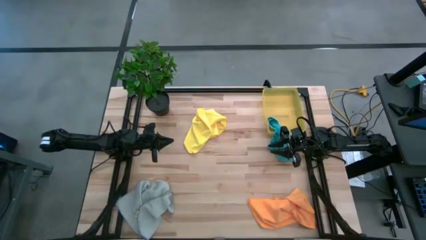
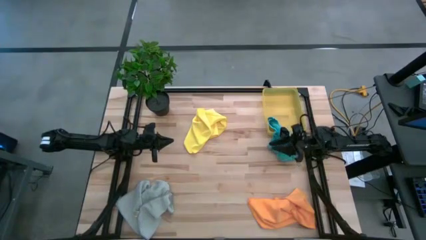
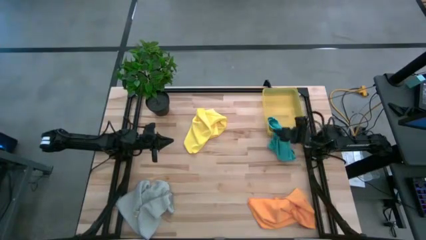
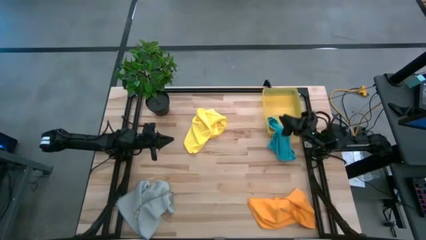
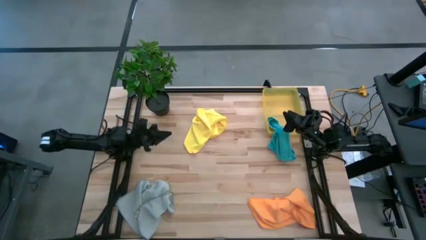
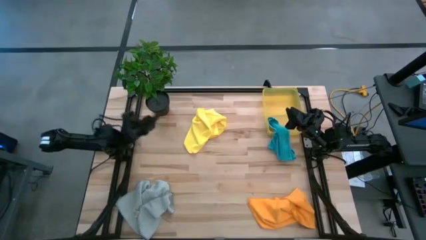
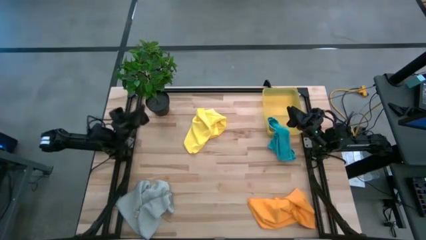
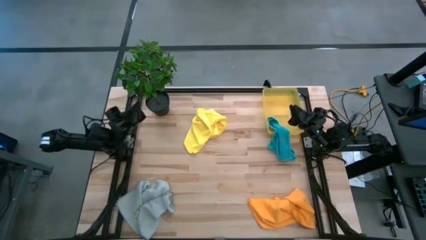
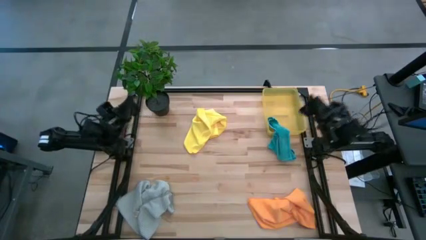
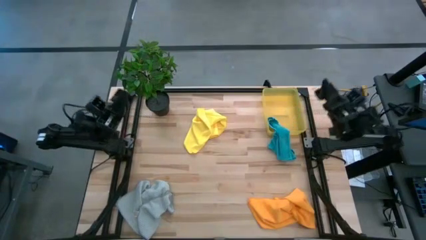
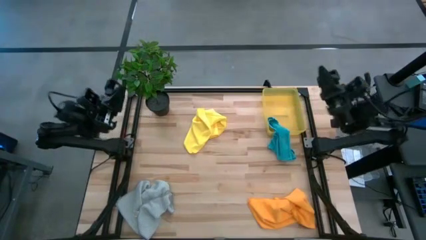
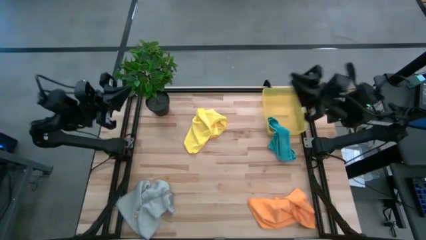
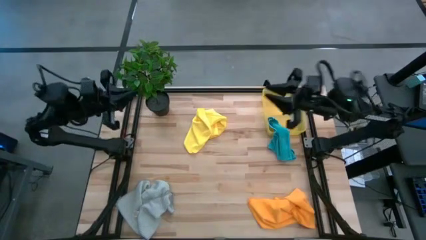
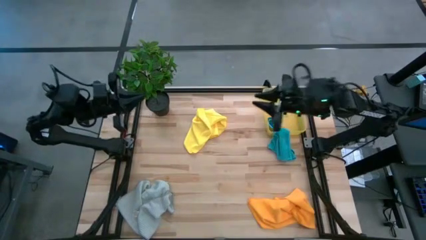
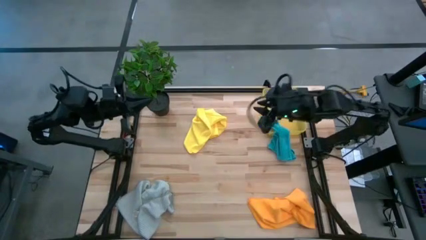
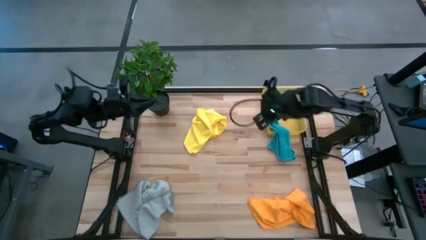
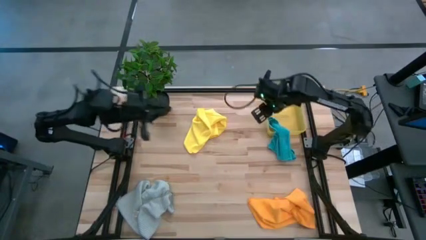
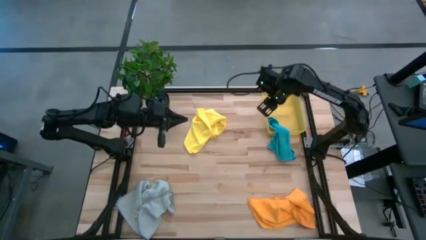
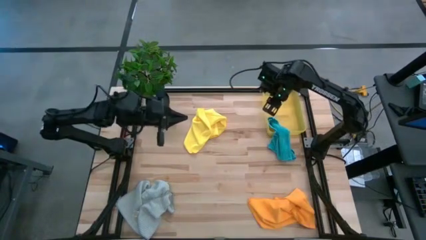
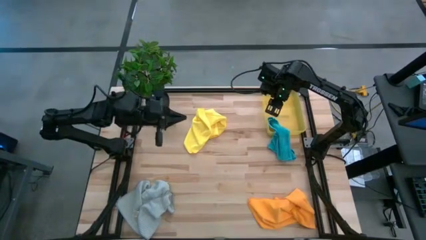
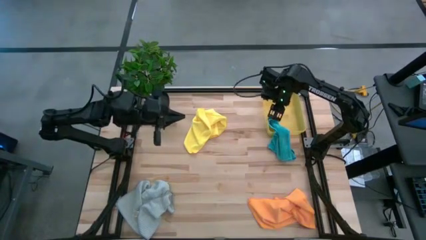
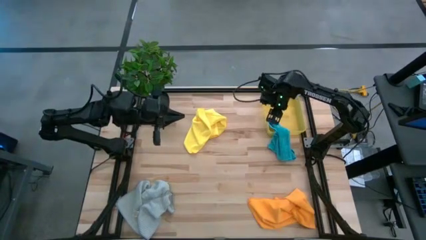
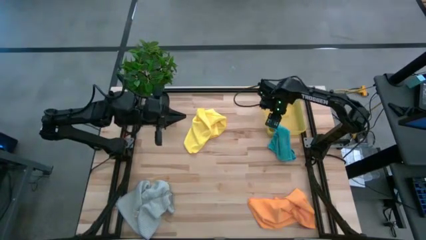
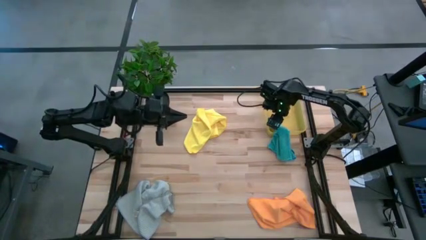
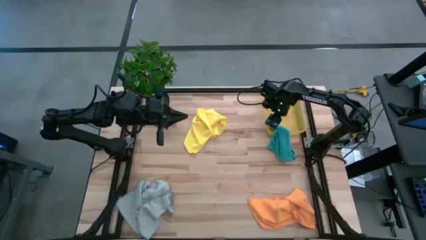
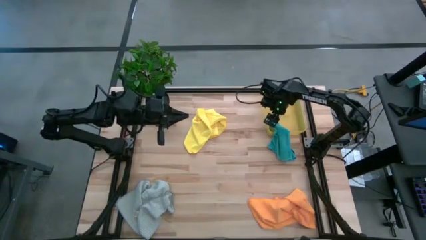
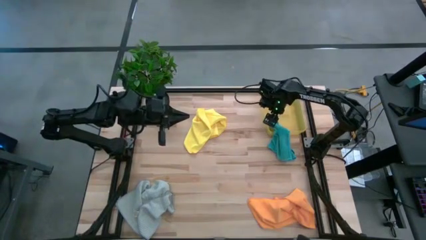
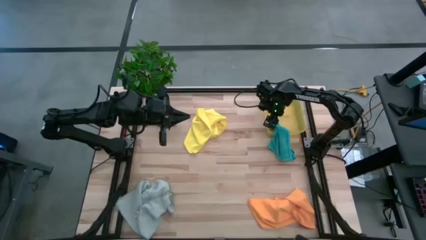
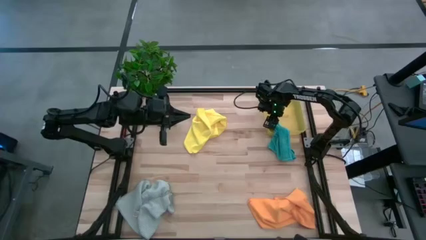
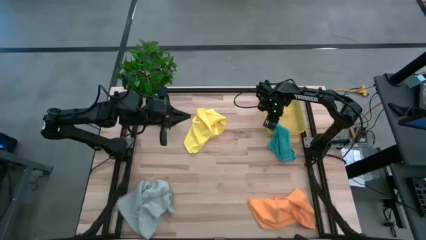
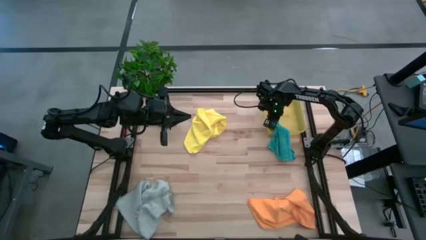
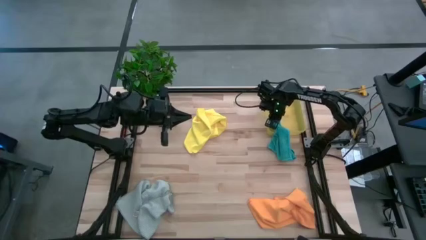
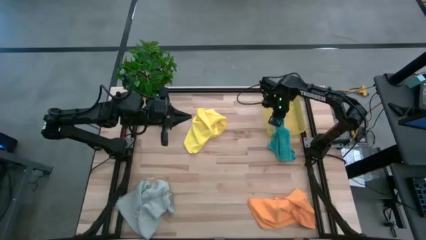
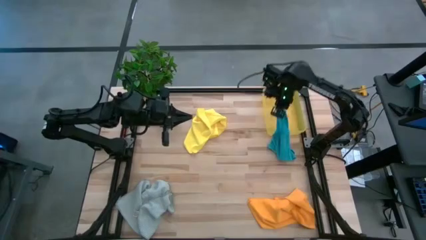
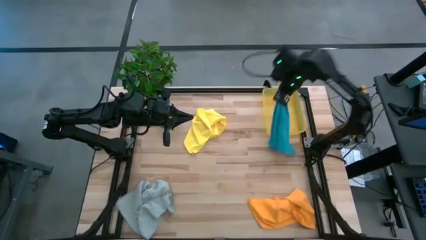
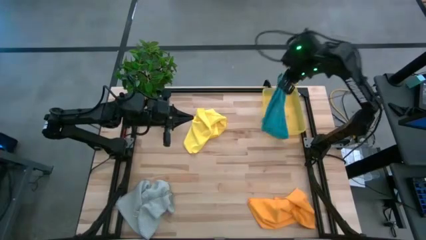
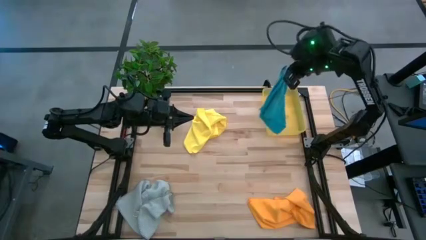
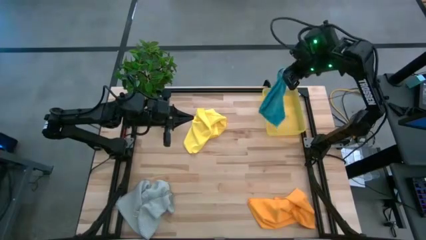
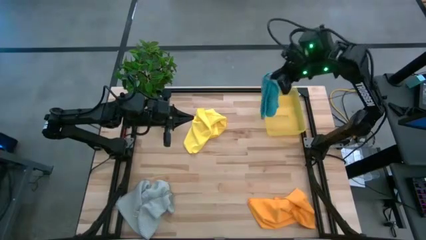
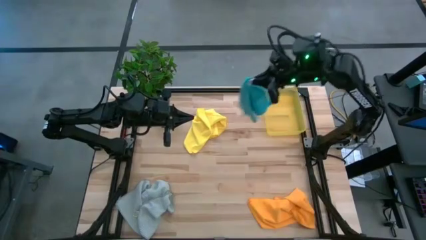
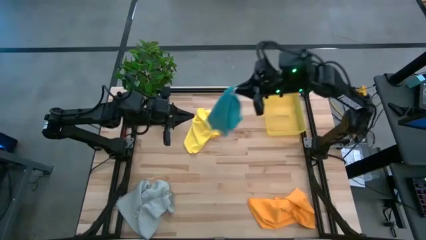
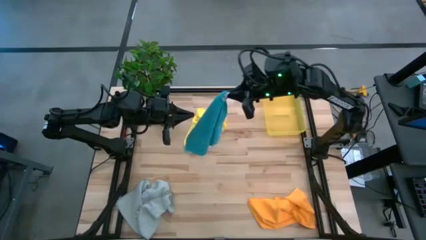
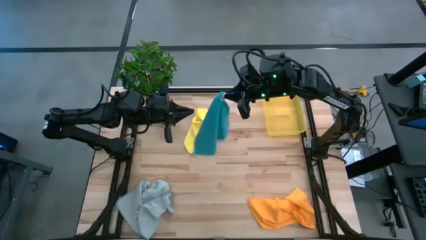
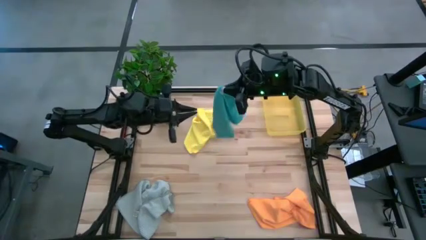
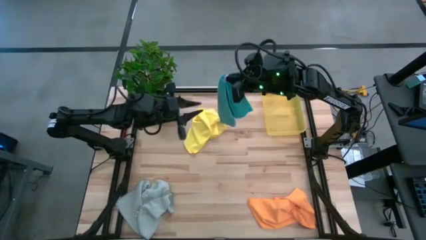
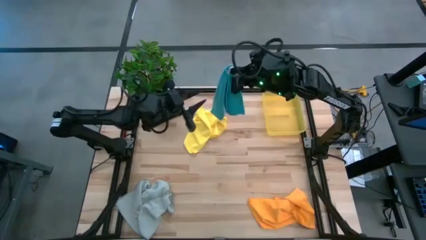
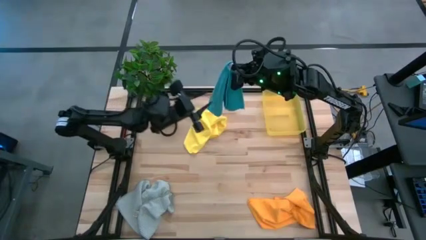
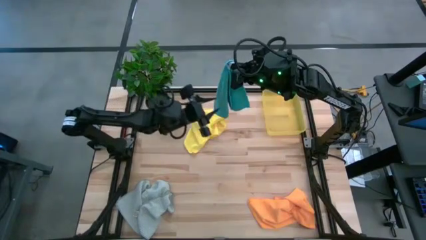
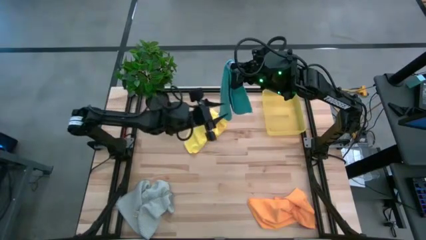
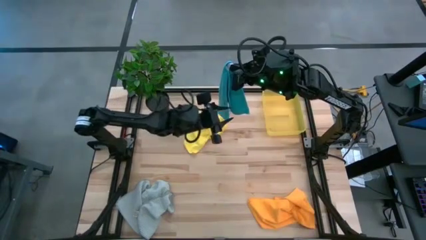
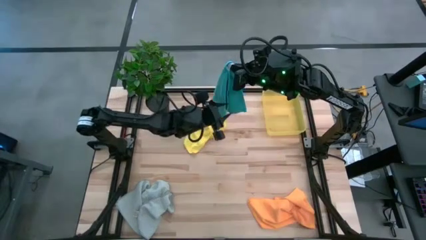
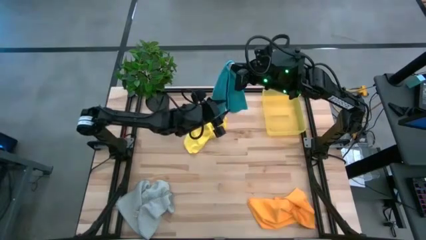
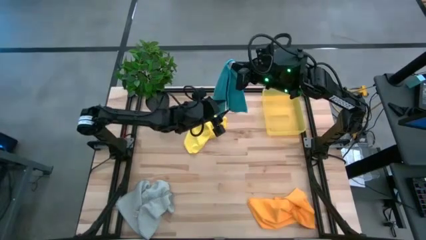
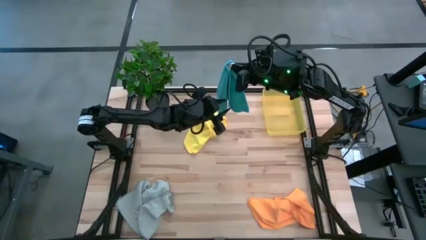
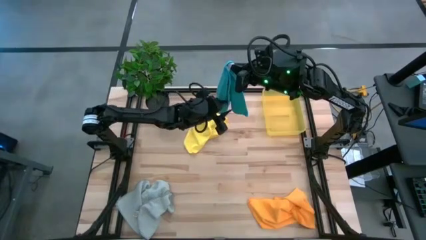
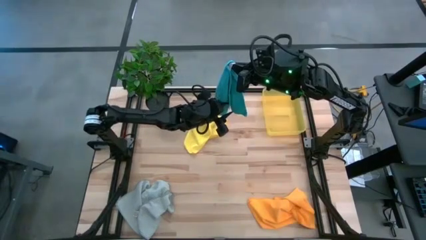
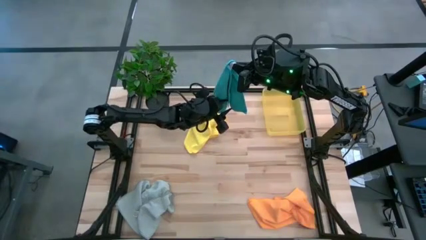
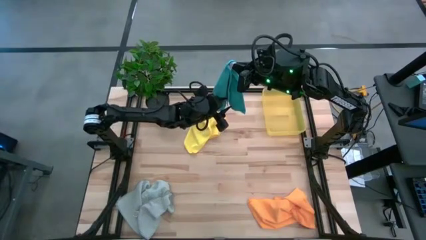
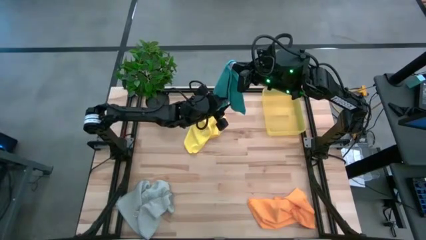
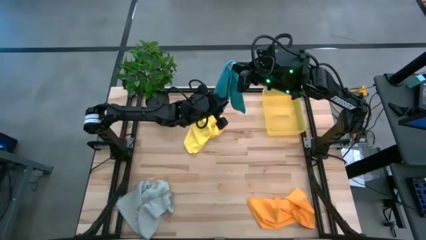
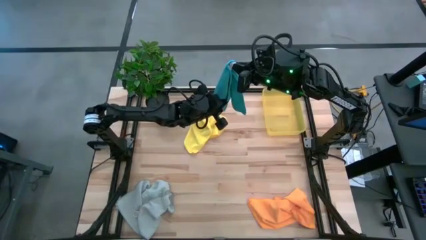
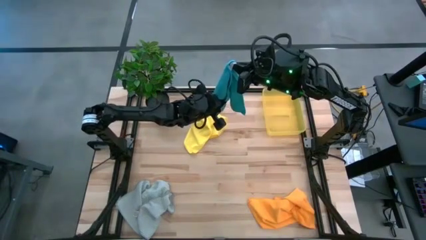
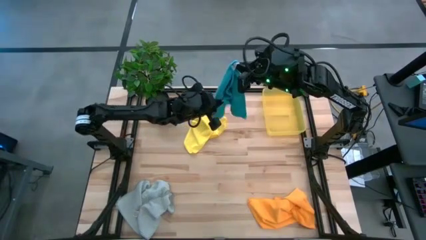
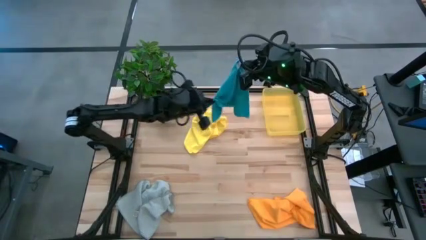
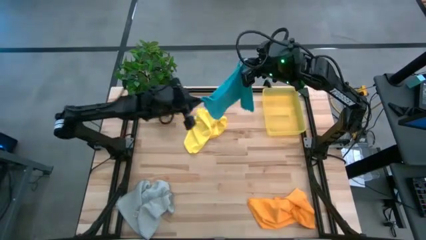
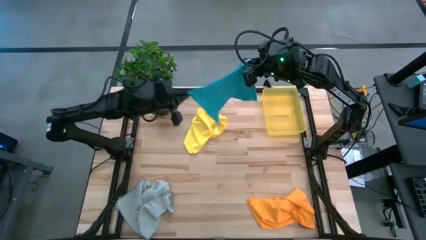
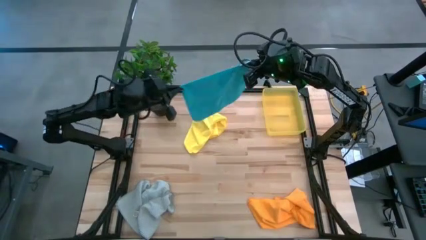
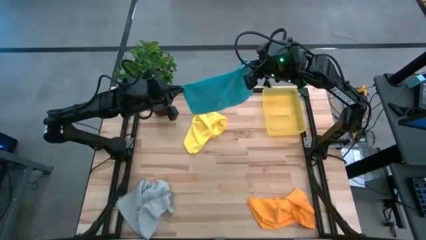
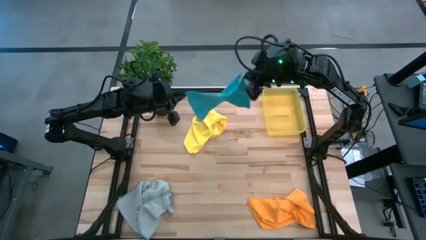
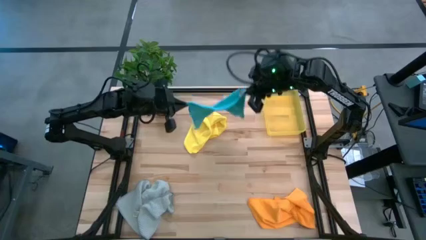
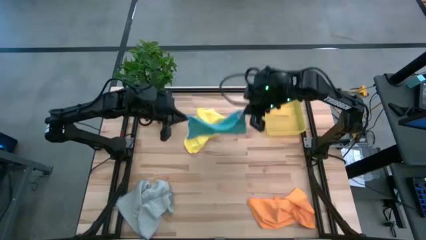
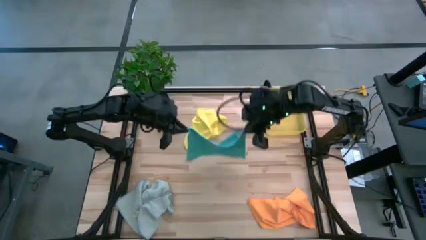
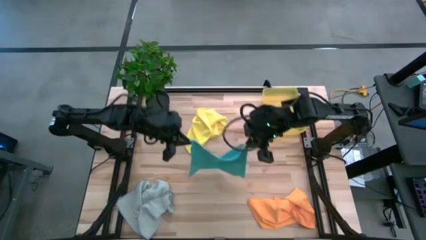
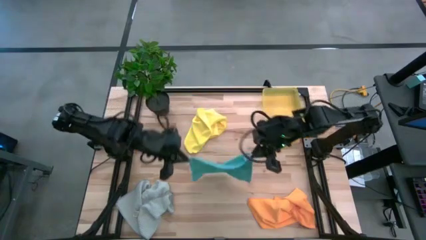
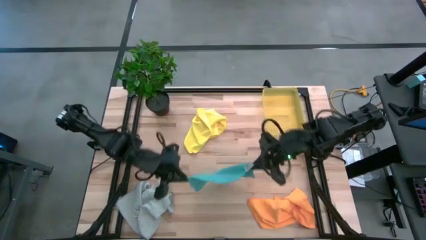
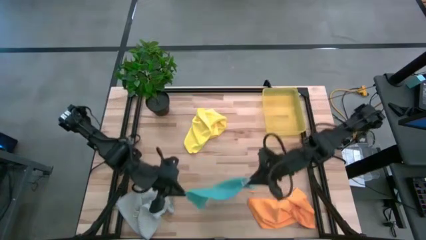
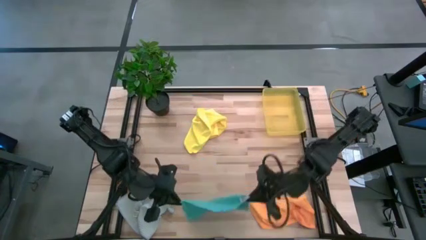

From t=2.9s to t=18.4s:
Task: Fold microfiber towels
Fold the blue microfiber towel
